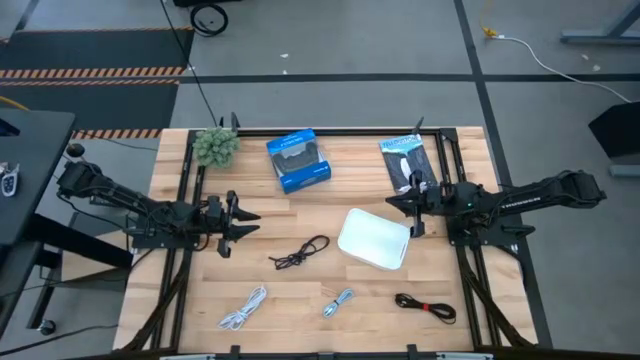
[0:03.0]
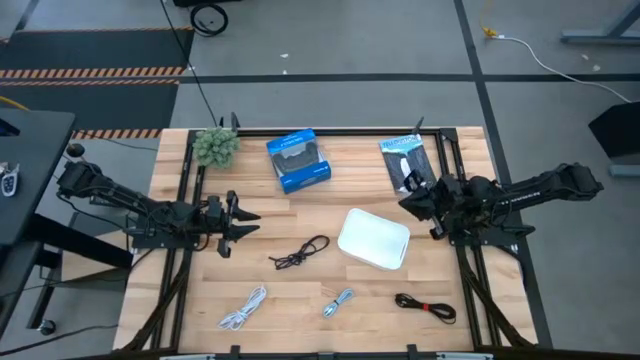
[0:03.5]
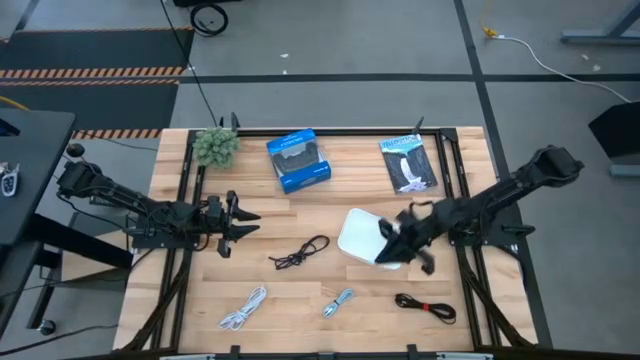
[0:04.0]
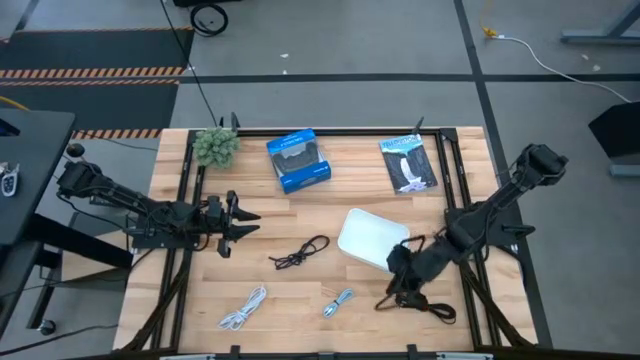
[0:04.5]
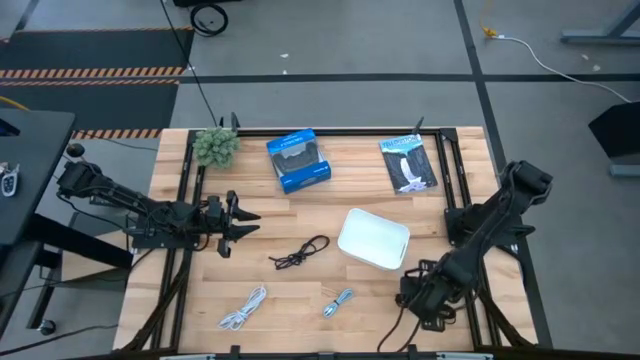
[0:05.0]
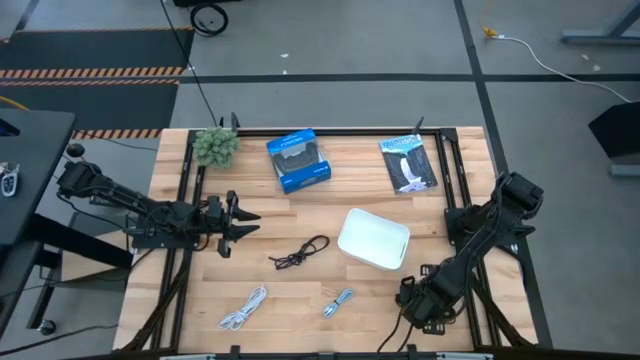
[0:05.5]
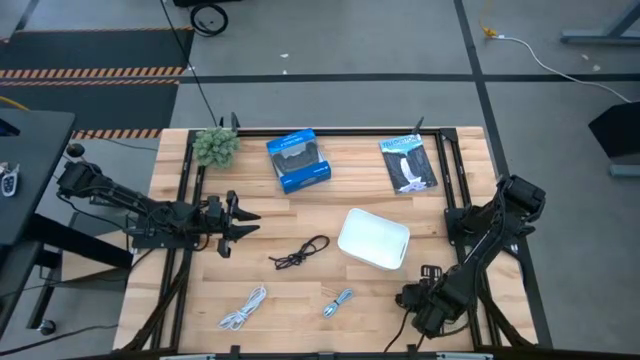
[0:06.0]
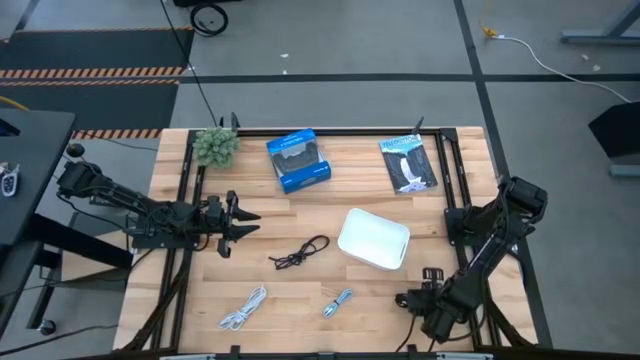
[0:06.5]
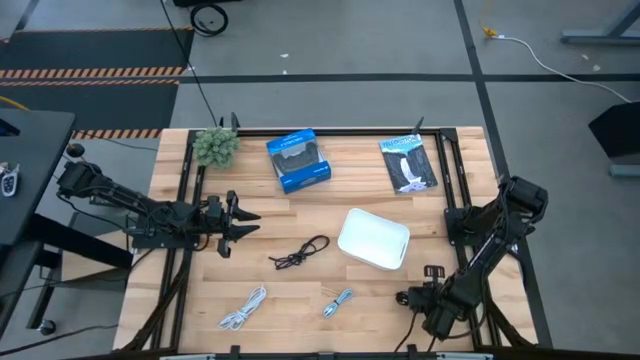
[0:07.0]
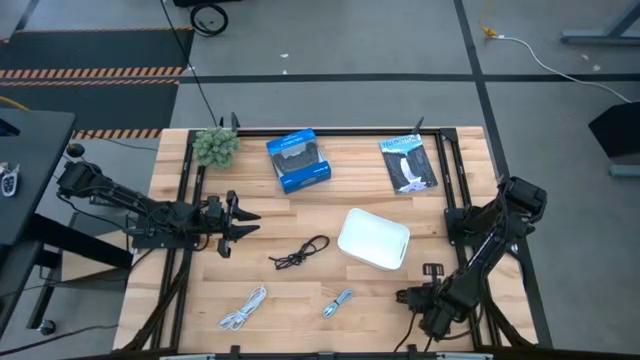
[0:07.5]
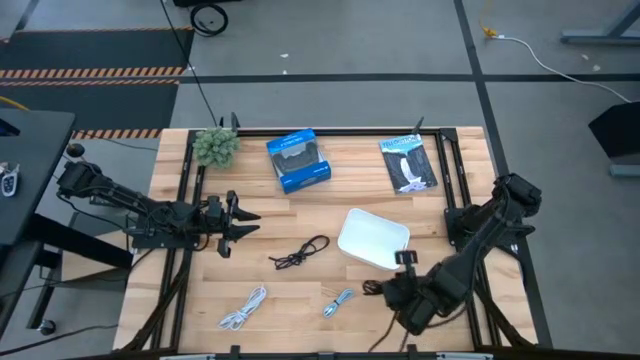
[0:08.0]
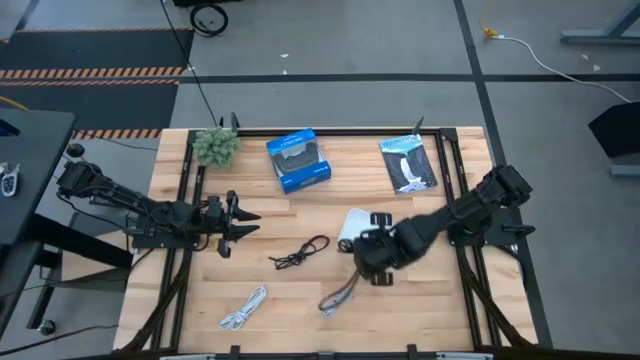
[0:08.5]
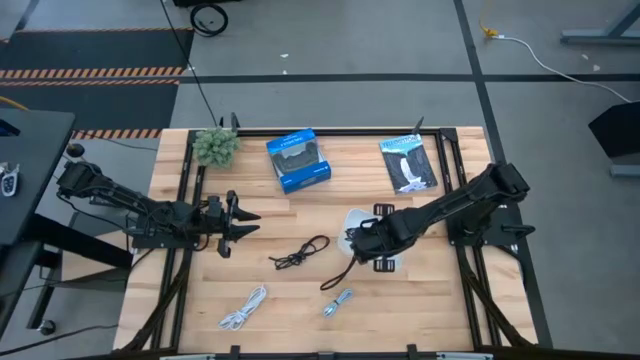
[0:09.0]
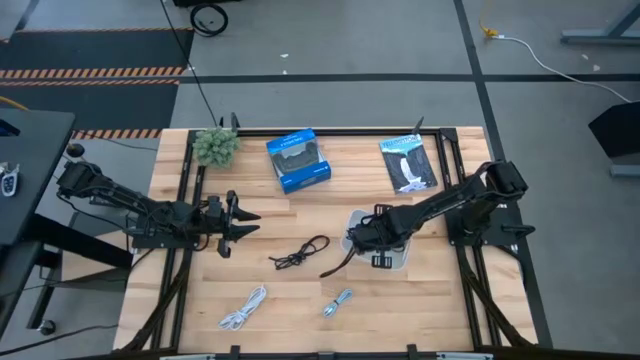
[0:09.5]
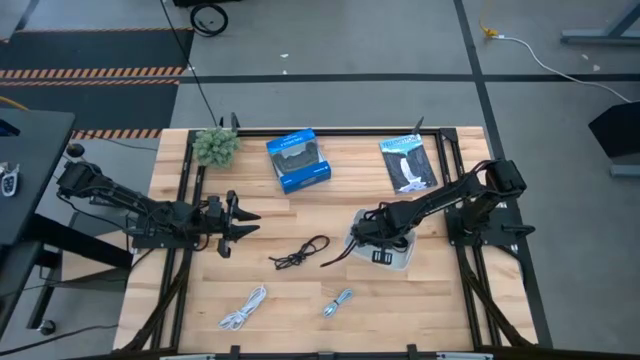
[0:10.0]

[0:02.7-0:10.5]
Task: Pick and place USB-C Cables
Put the bottom black charger cable into the white bin

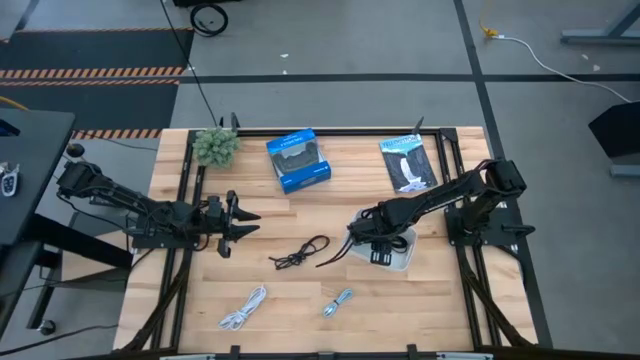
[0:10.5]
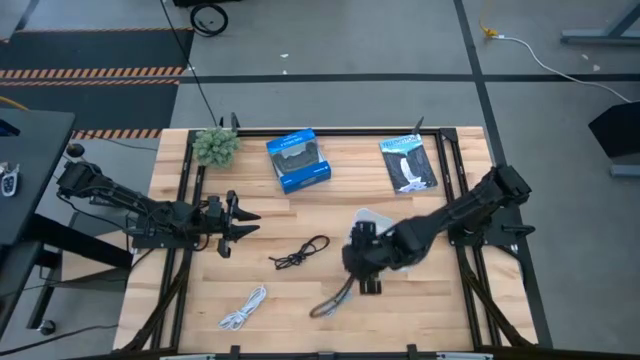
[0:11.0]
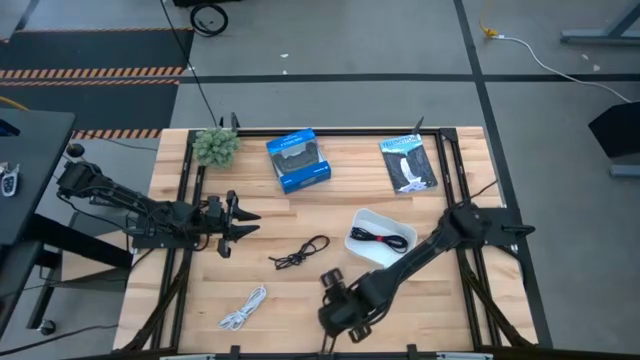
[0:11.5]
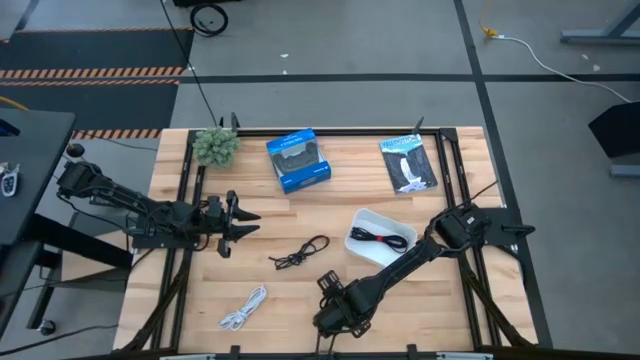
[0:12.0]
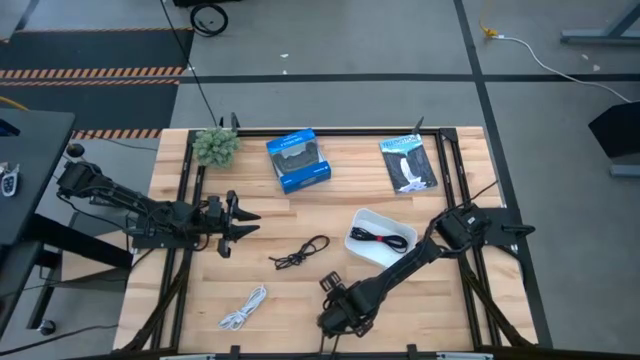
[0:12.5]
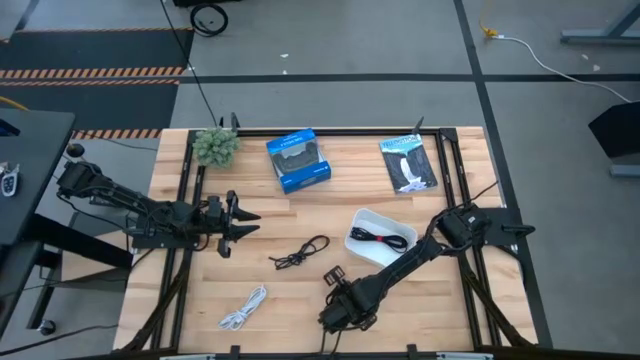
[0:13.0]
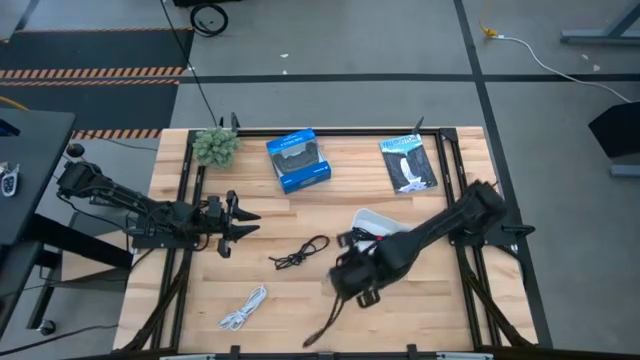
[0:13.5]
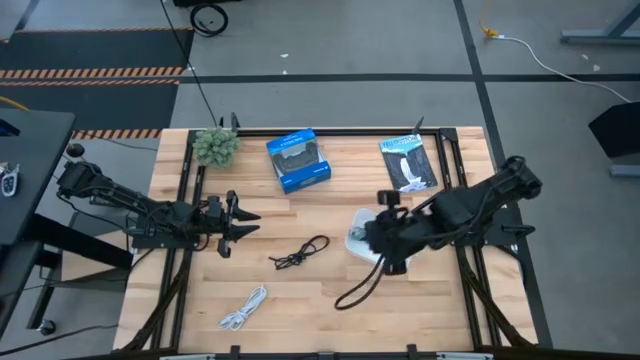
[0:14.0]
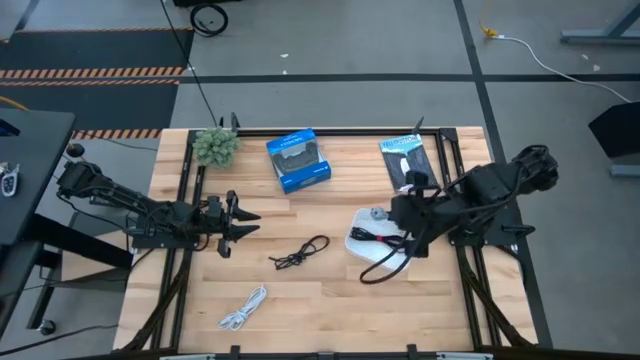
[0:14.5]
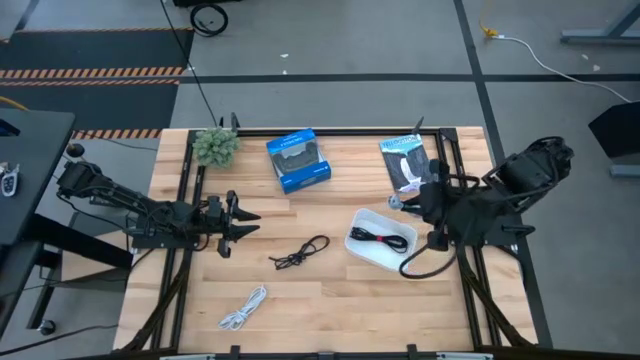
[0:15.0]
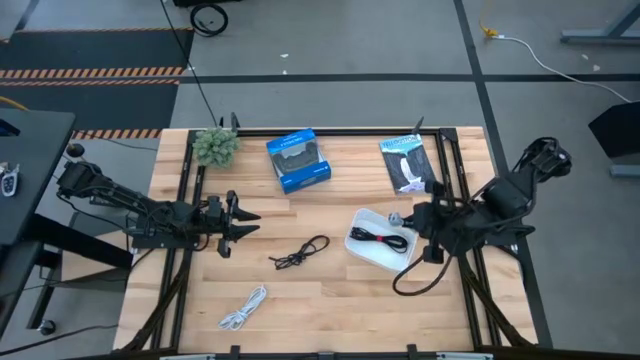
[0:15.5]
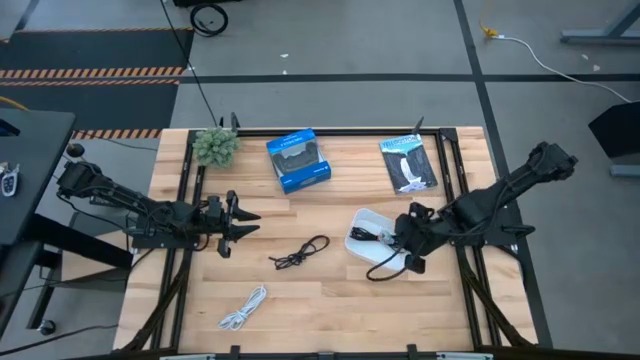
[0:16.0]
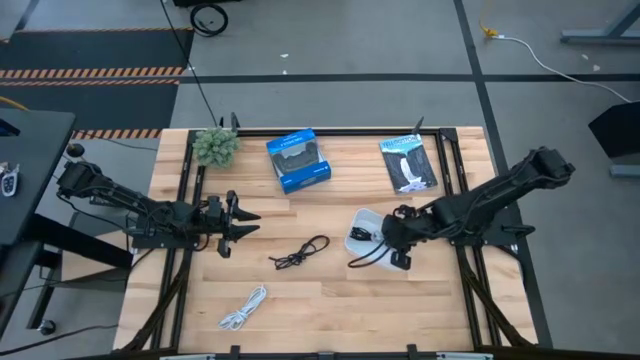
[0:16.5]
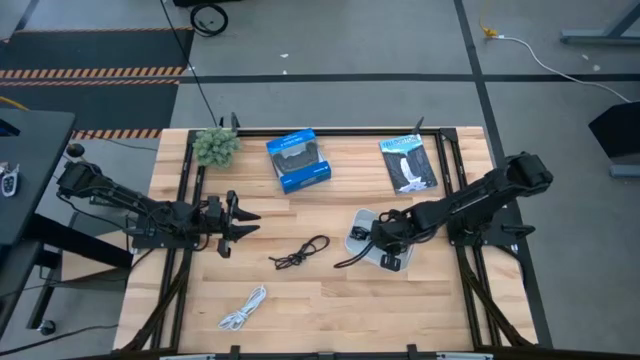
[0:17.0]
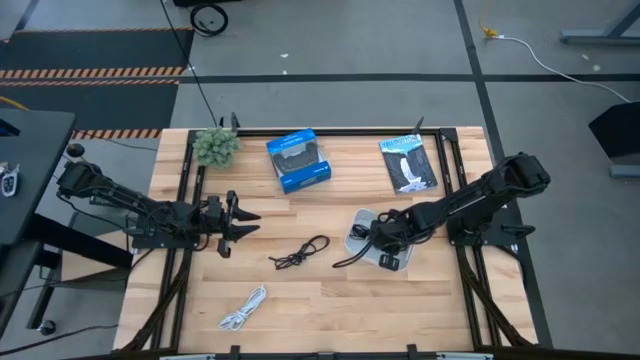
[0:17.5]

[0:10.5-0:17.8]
Put the light blue charger cable into the white bin

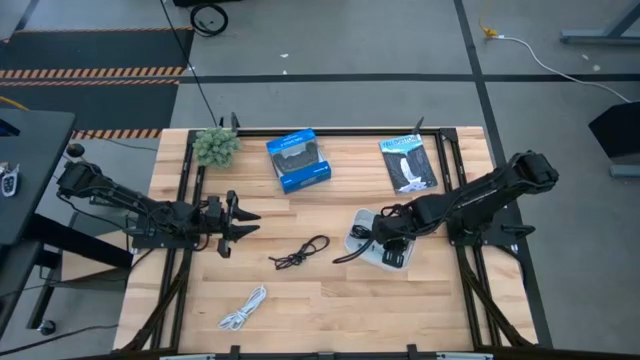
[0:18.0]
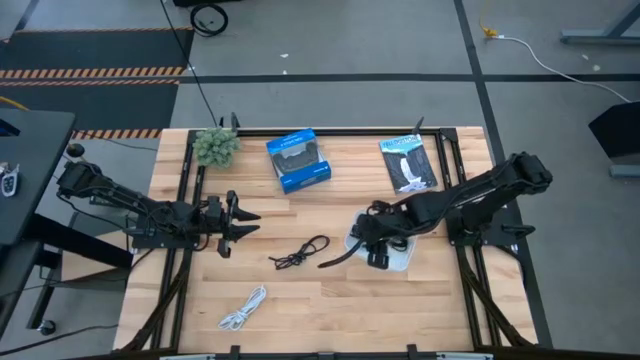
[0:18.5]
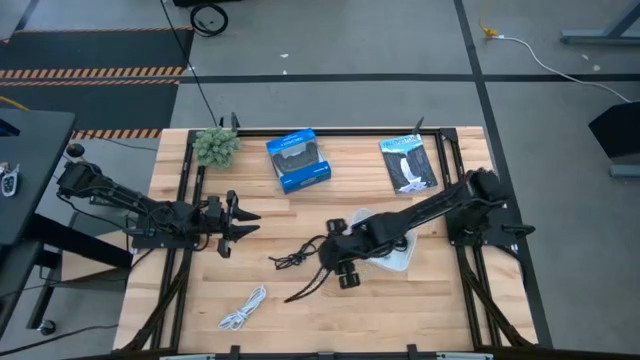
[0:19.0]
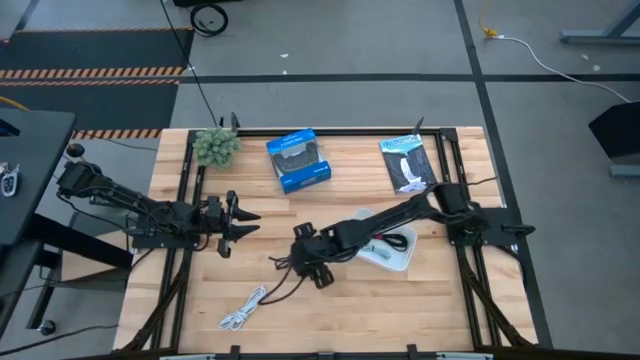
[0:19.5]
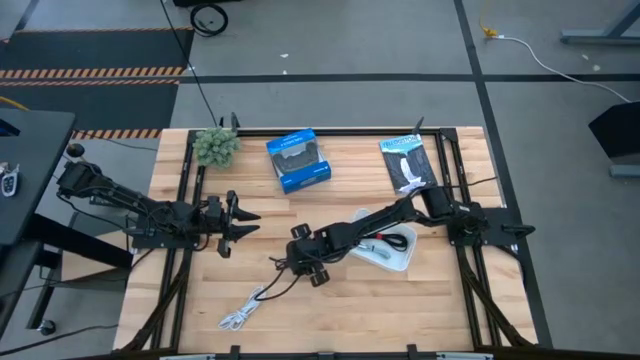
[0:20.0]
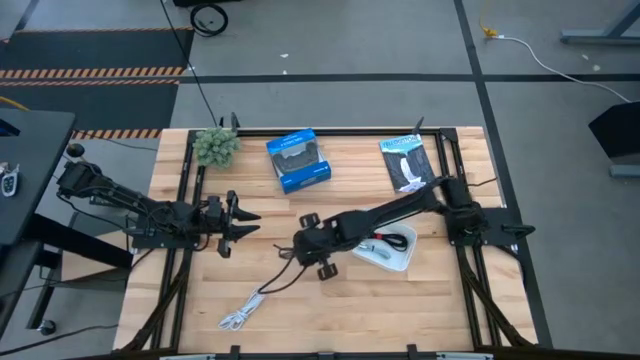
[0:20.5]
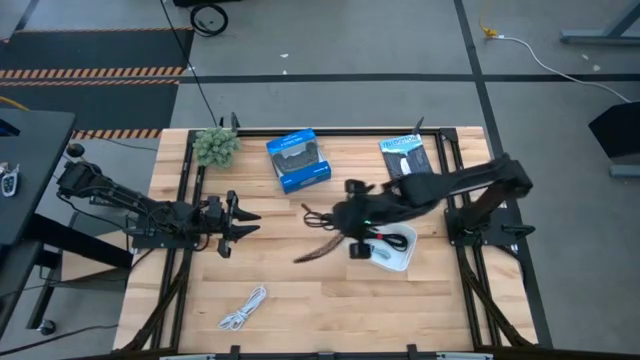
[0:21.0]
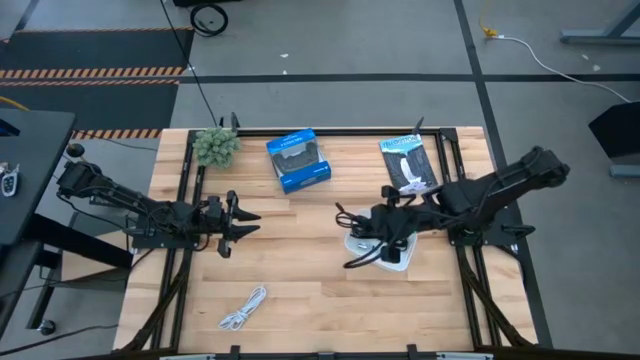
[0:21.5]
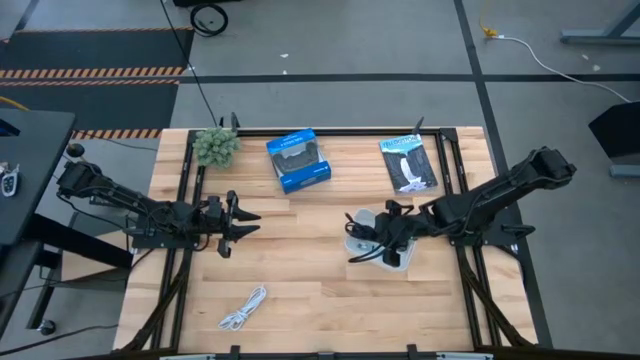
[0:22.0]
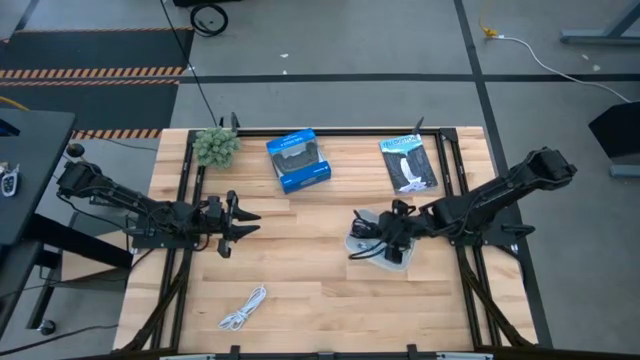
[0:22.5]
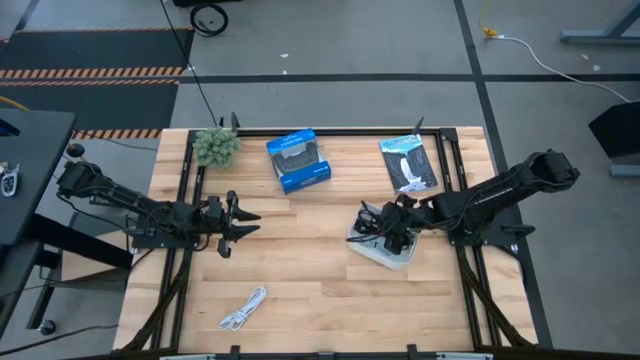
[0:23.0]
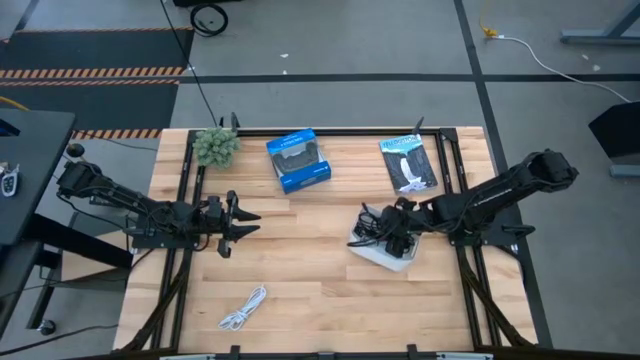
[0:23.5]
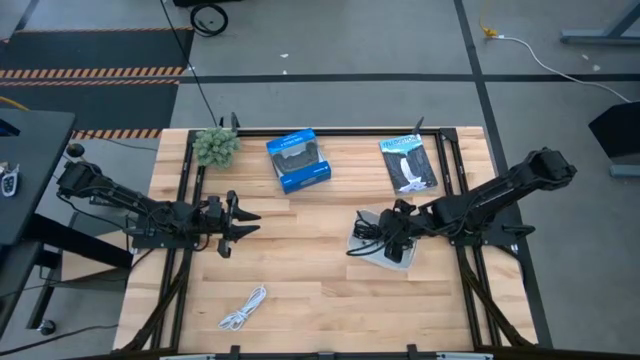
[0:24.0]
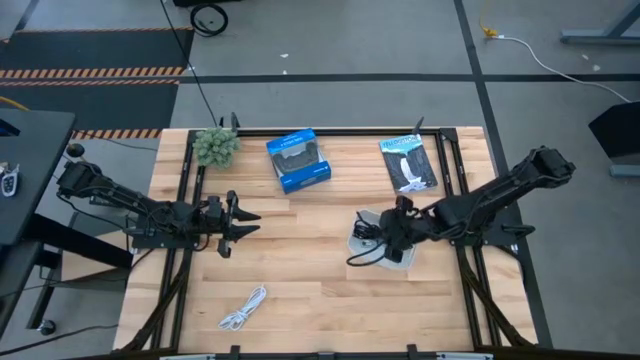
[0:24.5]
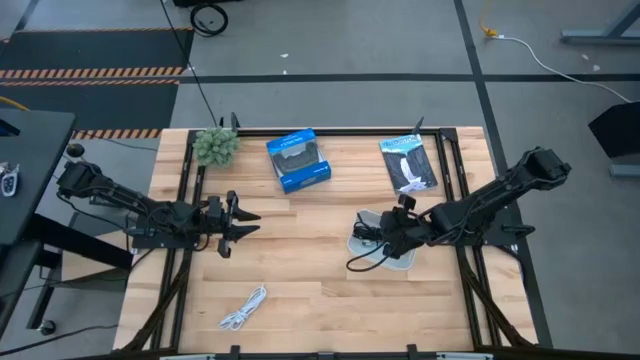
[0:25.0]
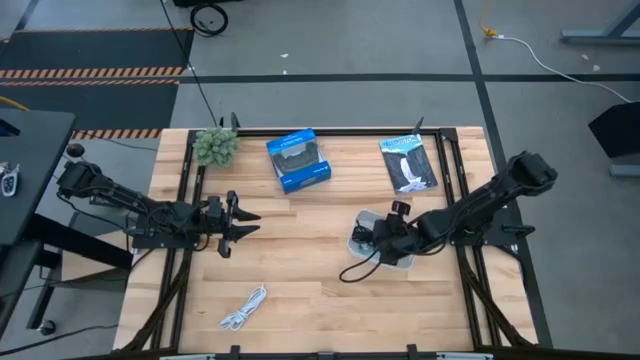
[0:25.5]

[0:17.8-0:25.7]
Put the black charger cable into the white bin
